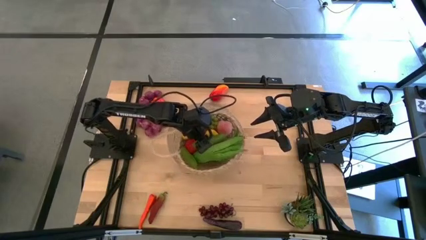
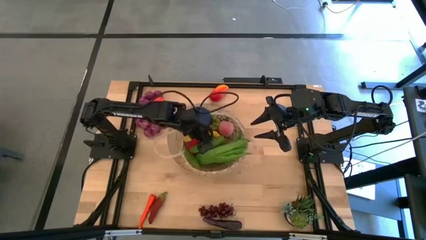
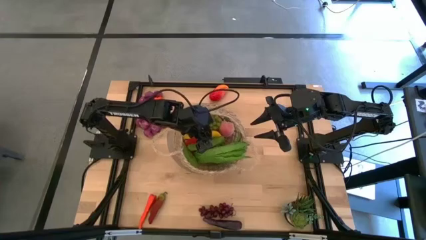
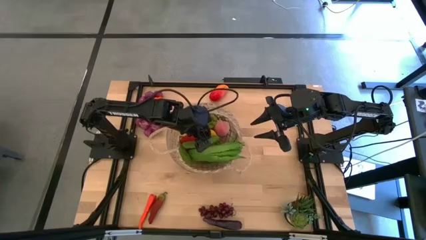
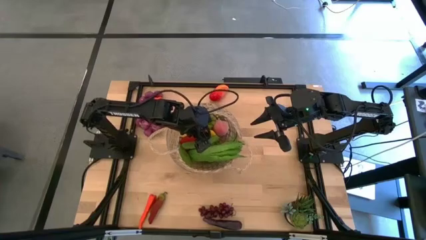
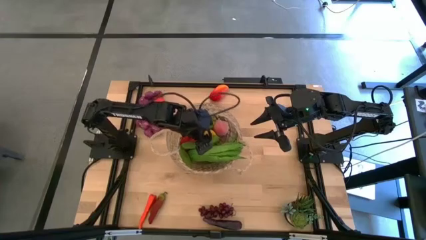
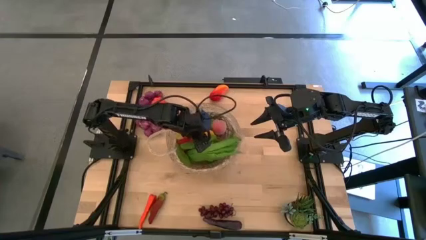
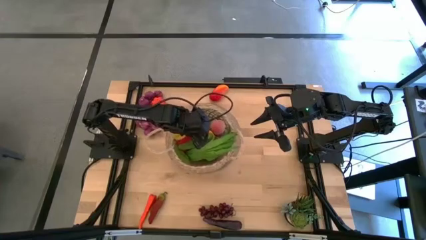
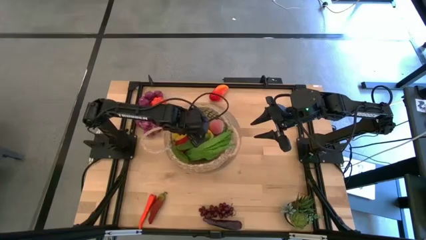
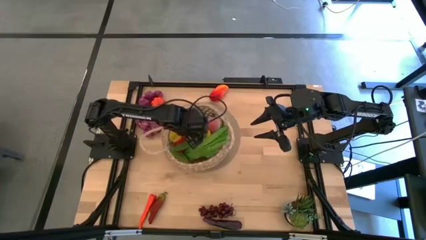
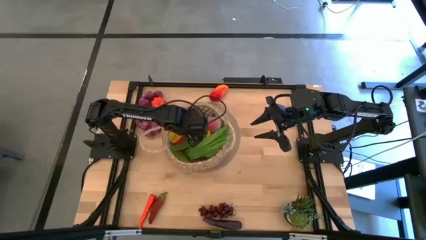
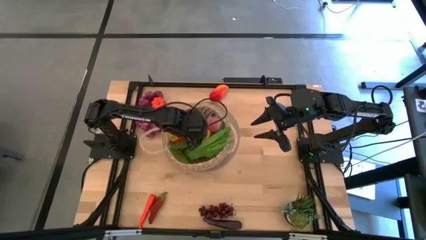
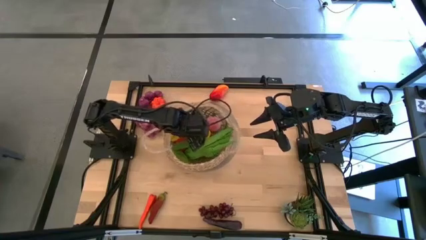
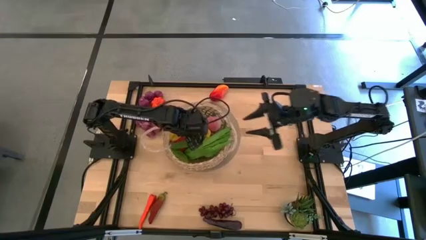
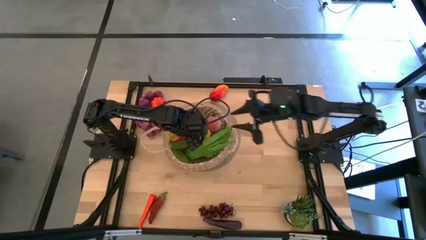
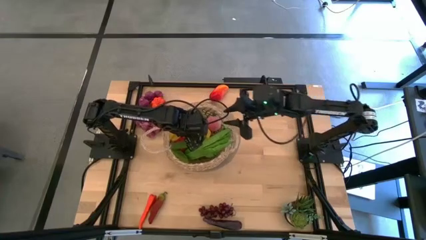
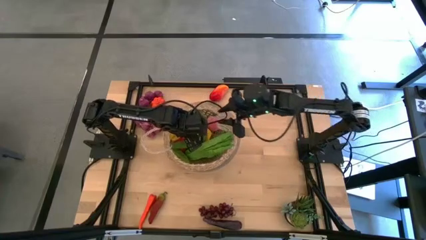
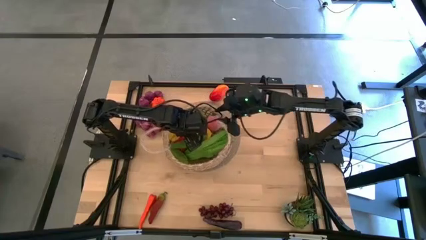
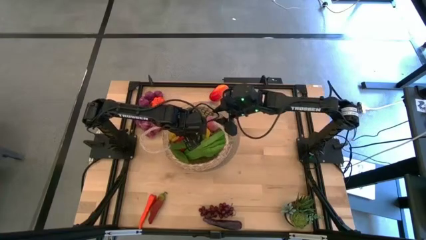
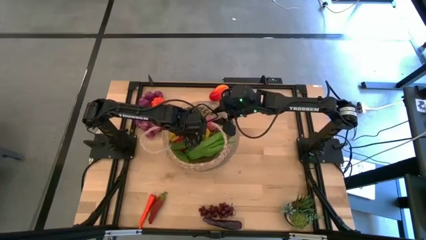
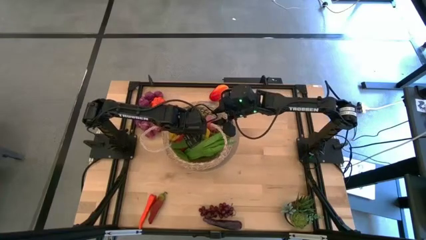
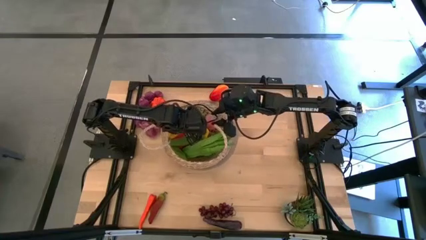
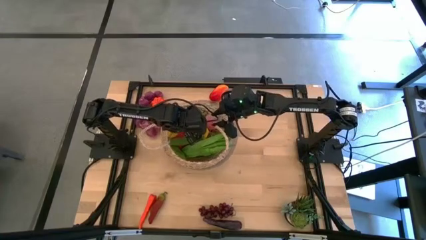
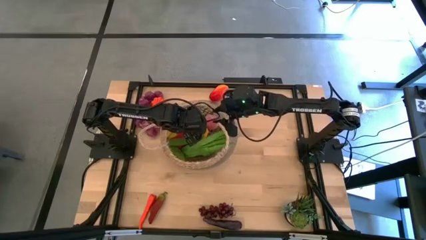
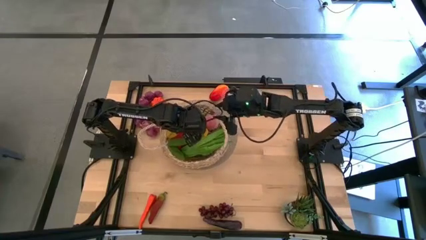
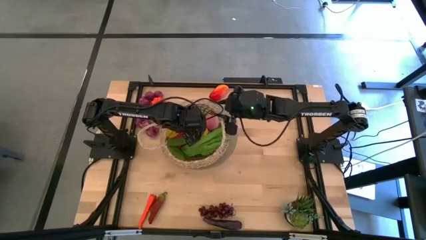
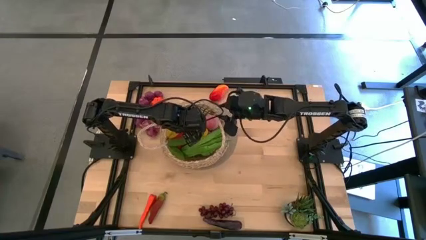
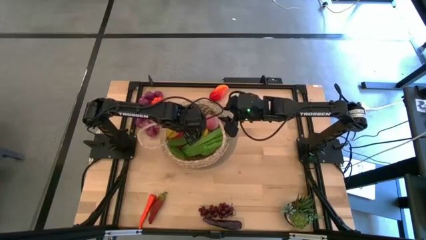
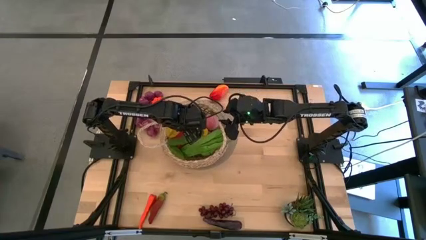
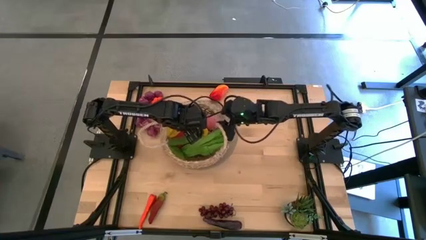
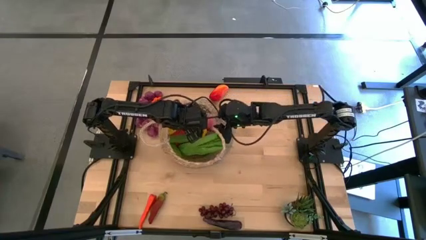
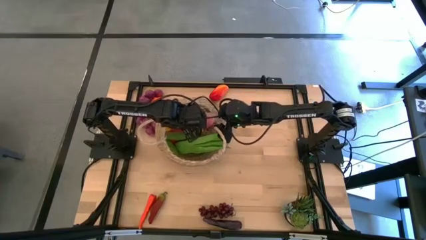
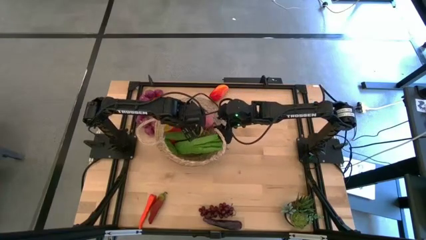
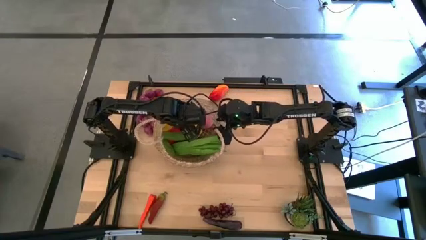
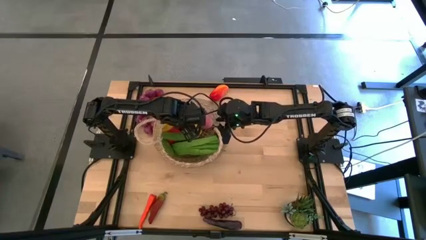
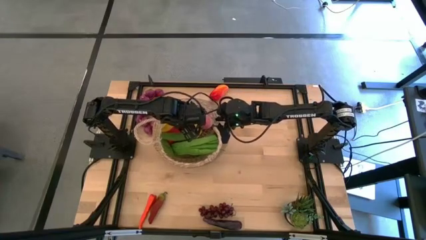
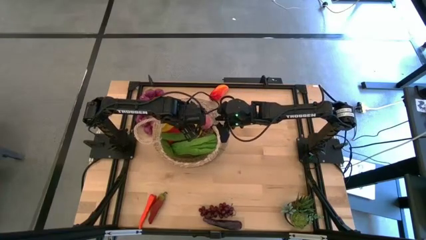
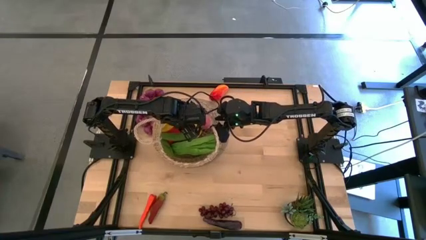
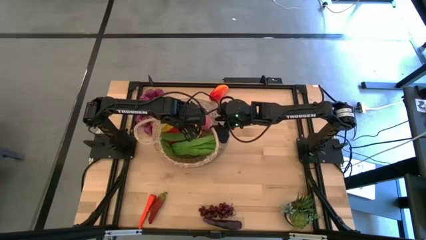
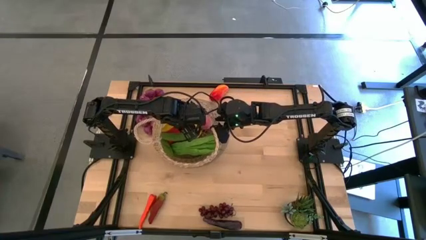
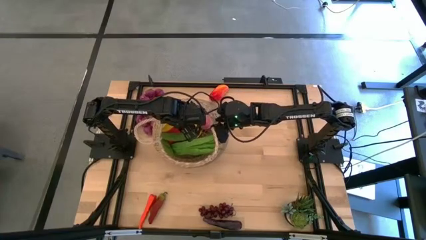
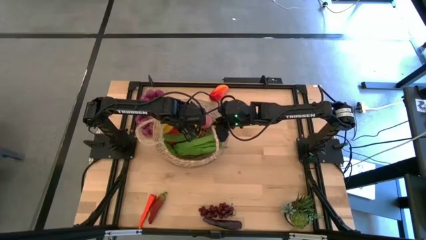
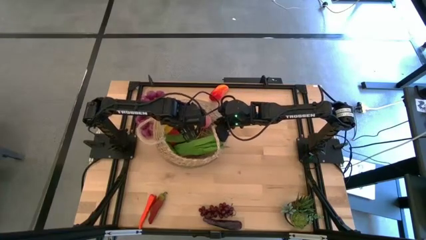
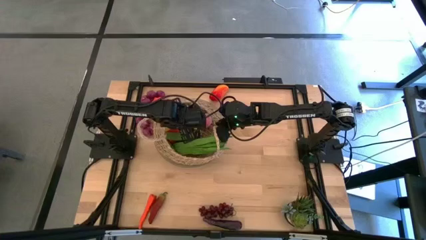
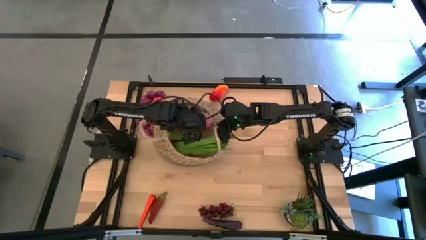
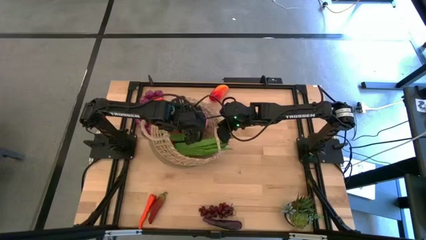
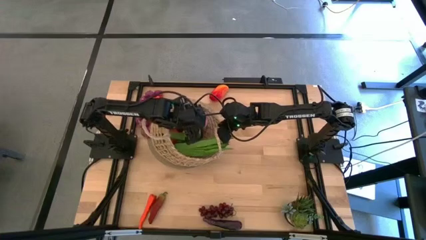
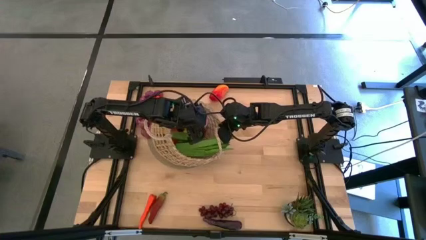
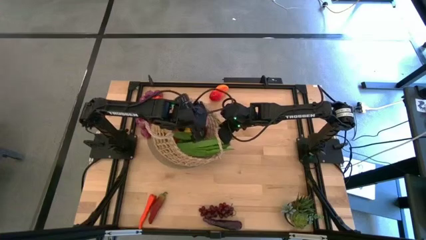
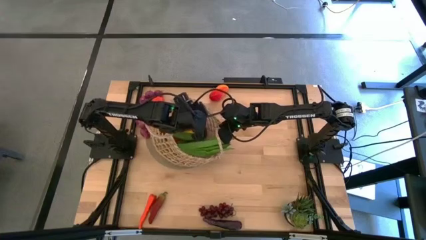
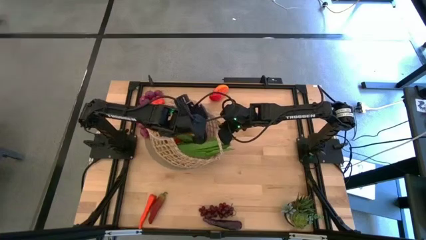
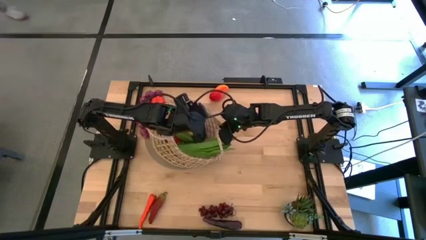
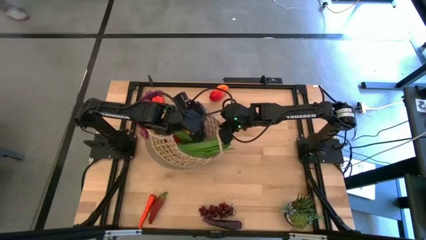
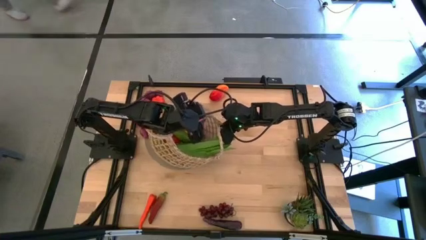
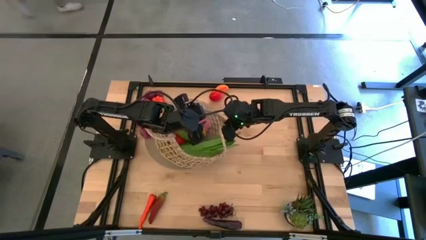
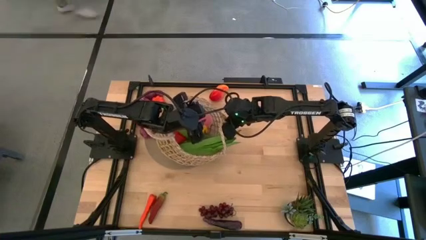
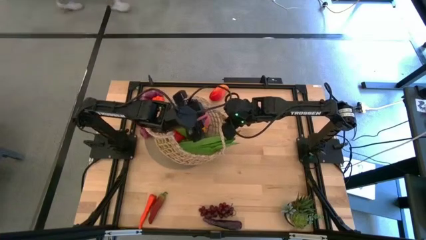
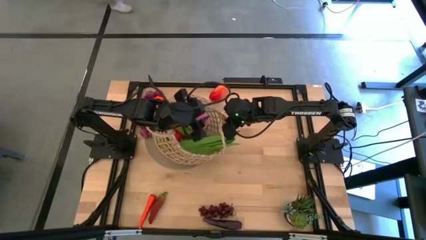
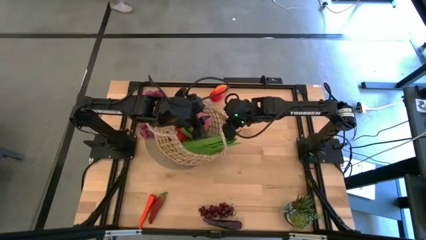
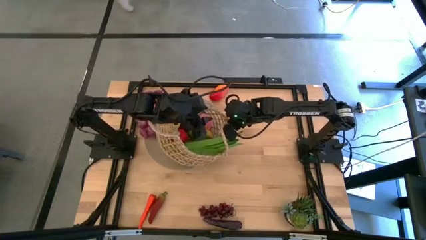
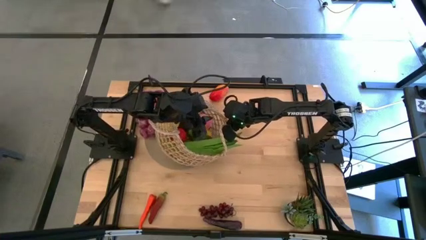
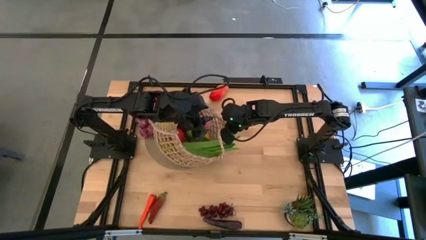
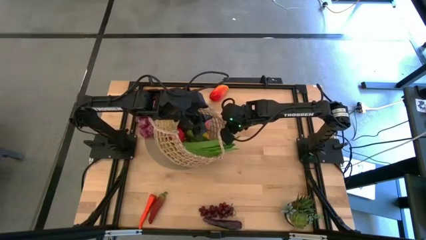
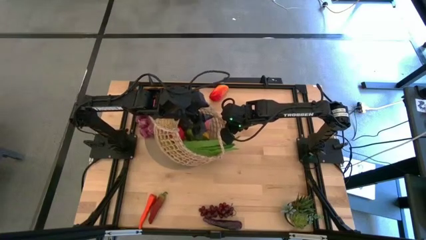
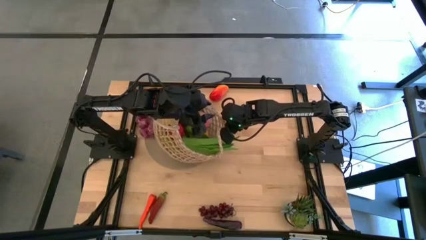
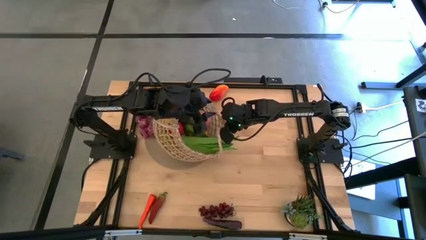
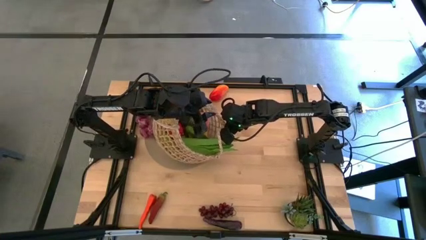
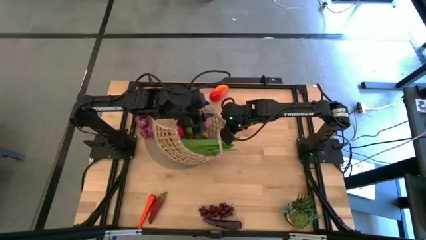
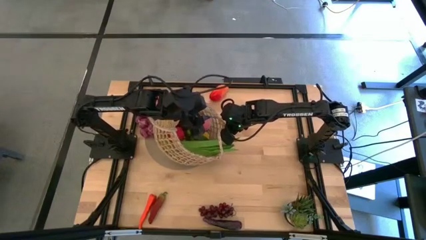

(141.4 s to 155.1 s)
Task: Build produce basket
Adjust the brown basket
